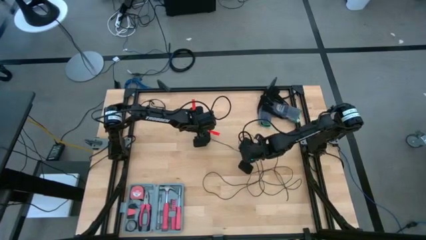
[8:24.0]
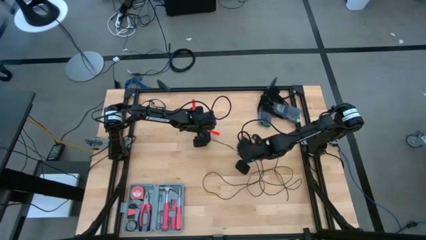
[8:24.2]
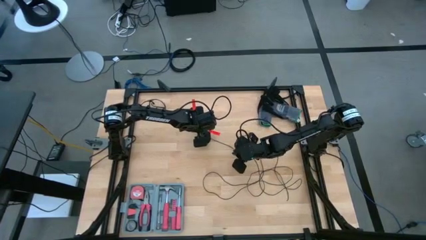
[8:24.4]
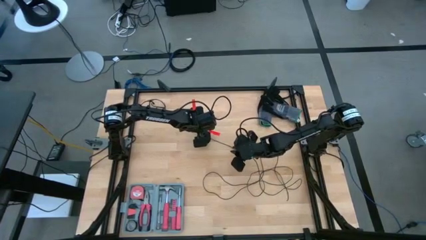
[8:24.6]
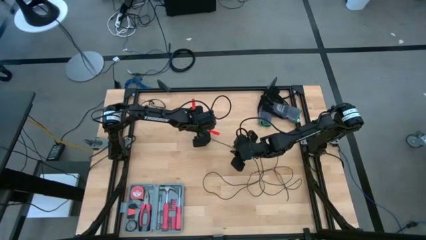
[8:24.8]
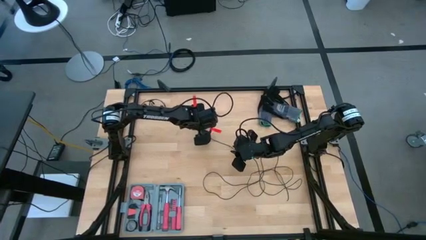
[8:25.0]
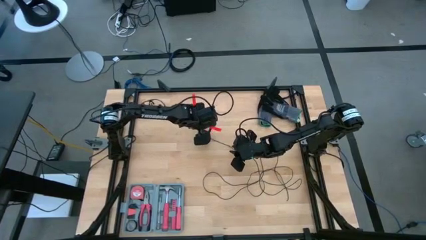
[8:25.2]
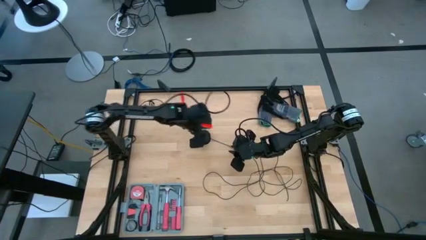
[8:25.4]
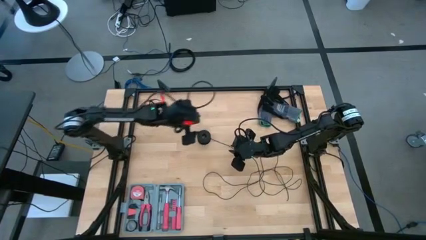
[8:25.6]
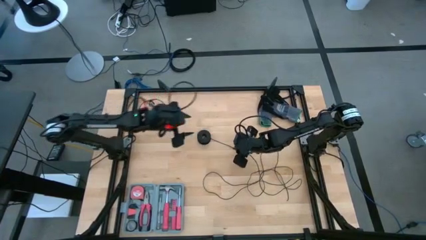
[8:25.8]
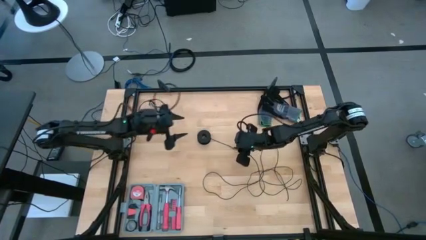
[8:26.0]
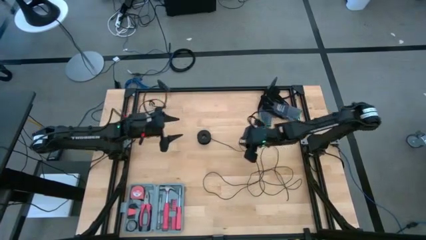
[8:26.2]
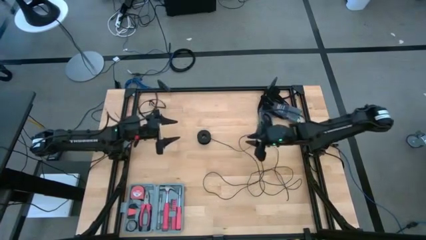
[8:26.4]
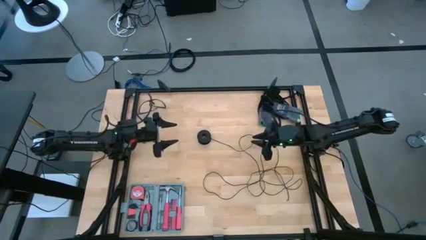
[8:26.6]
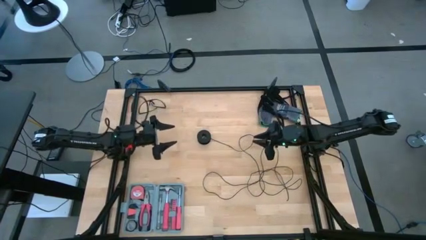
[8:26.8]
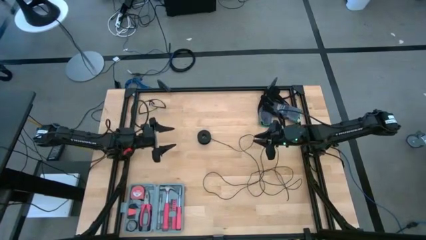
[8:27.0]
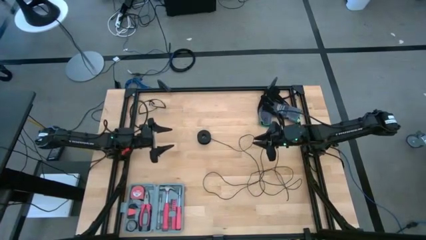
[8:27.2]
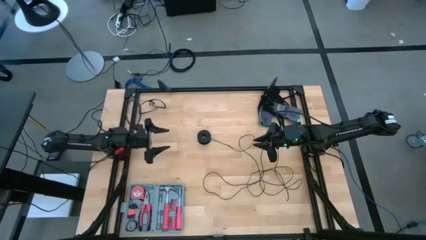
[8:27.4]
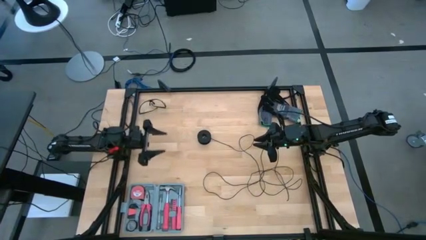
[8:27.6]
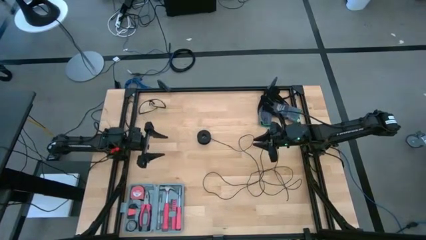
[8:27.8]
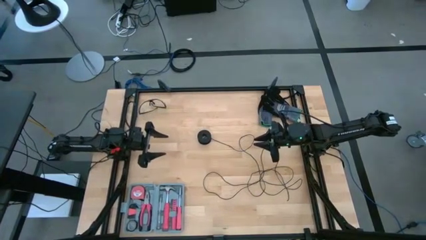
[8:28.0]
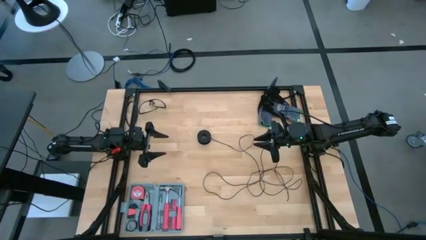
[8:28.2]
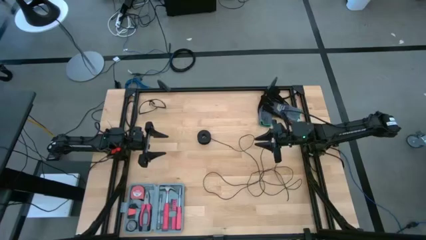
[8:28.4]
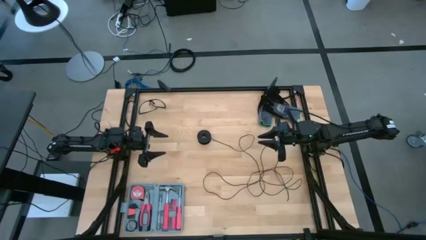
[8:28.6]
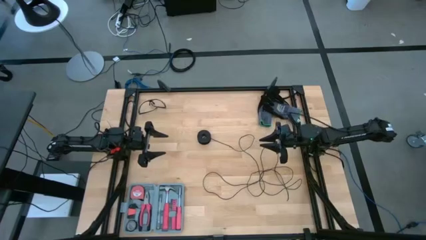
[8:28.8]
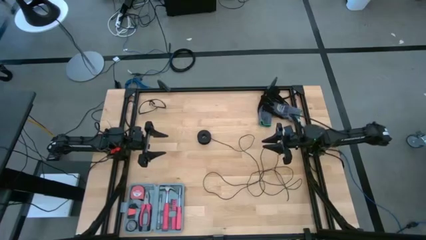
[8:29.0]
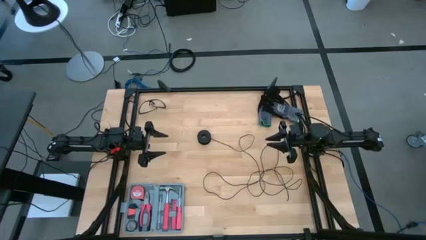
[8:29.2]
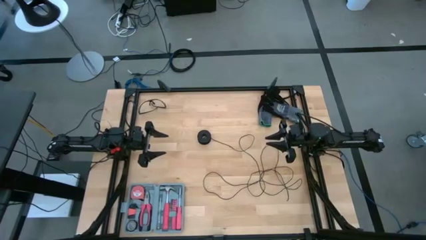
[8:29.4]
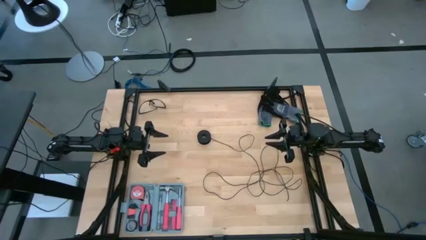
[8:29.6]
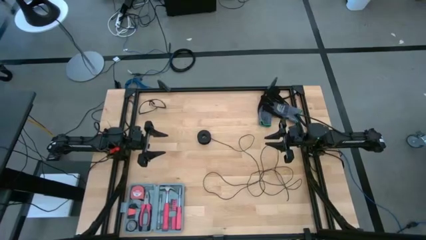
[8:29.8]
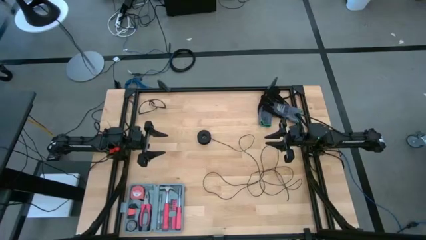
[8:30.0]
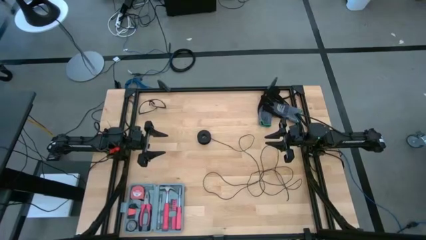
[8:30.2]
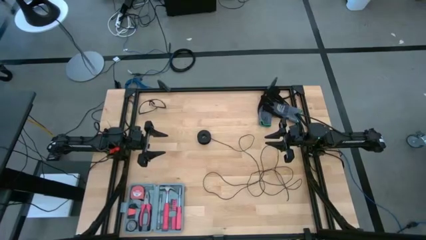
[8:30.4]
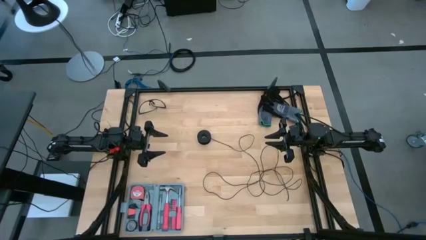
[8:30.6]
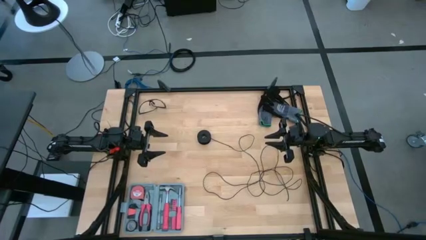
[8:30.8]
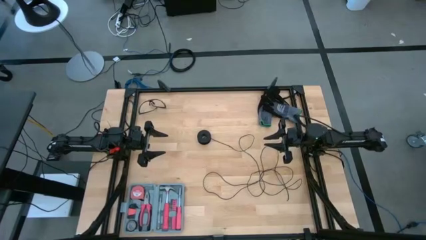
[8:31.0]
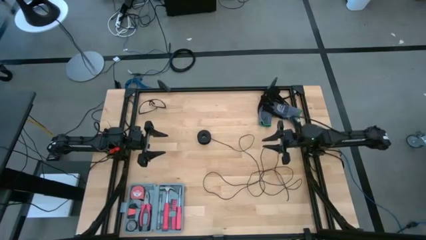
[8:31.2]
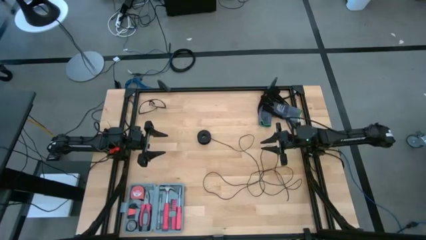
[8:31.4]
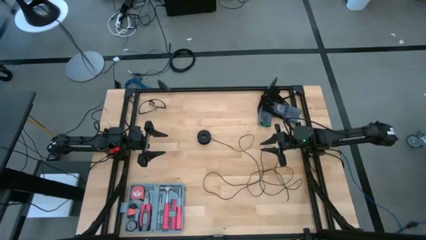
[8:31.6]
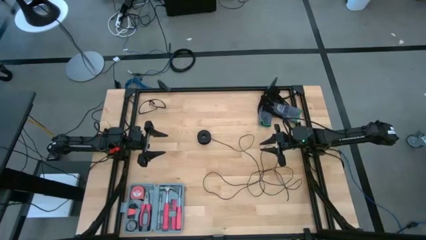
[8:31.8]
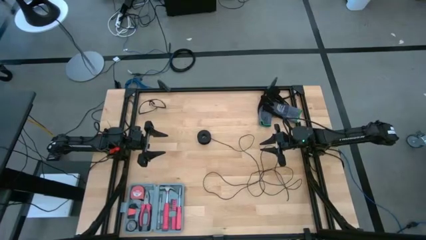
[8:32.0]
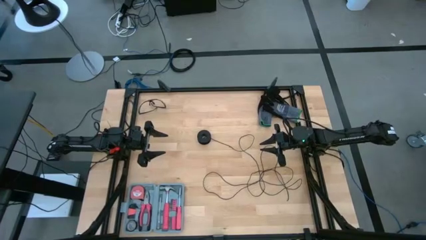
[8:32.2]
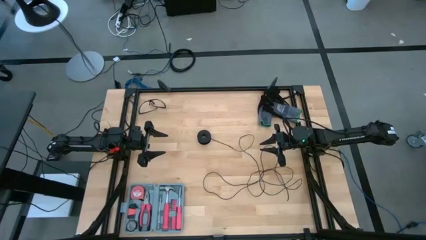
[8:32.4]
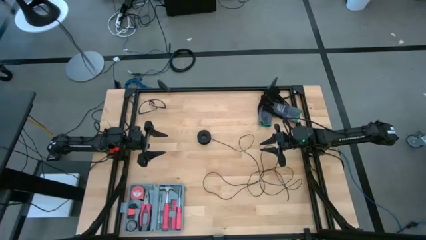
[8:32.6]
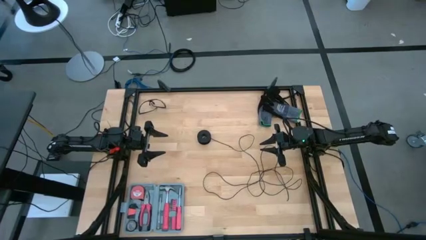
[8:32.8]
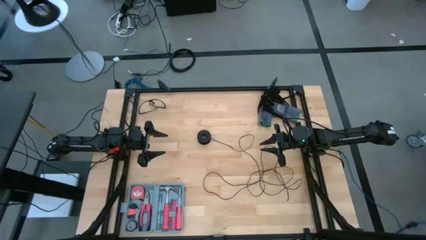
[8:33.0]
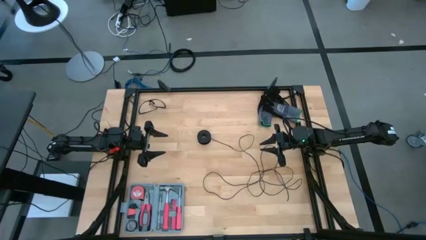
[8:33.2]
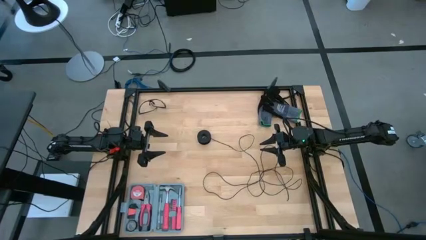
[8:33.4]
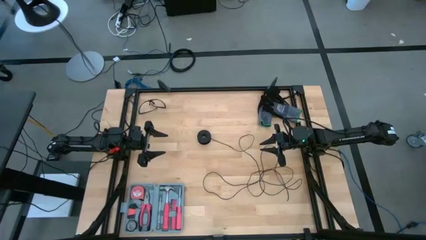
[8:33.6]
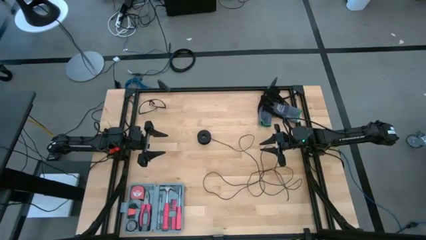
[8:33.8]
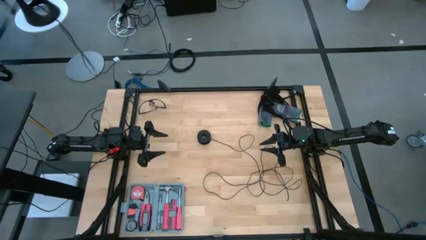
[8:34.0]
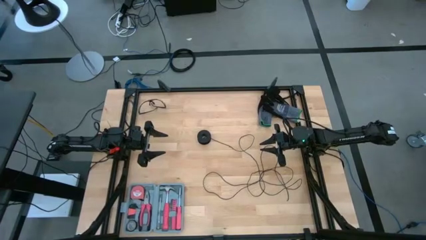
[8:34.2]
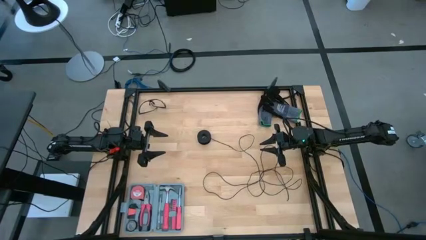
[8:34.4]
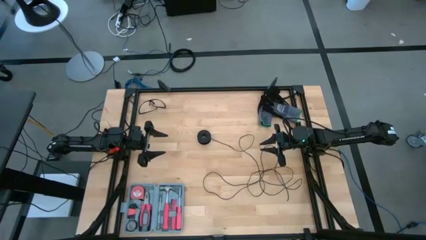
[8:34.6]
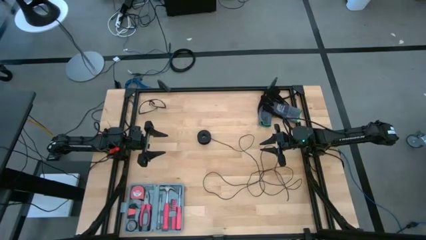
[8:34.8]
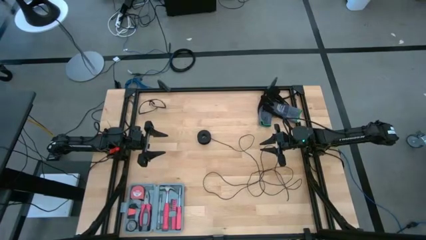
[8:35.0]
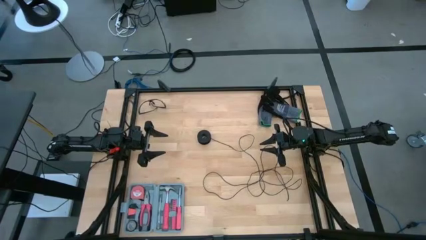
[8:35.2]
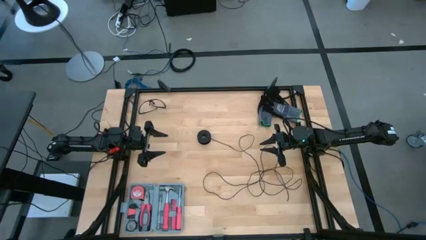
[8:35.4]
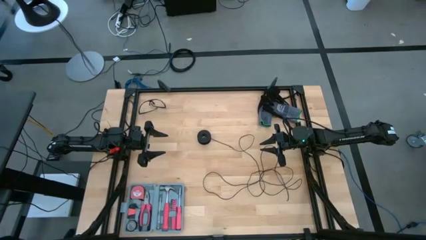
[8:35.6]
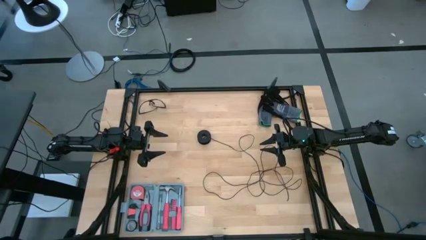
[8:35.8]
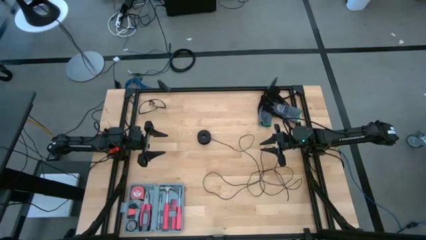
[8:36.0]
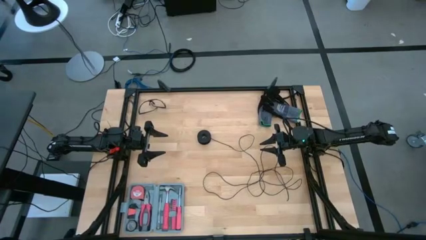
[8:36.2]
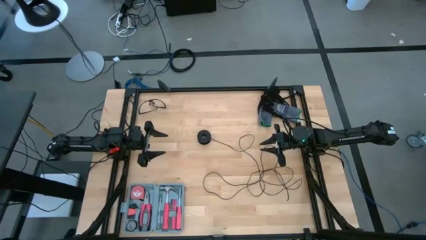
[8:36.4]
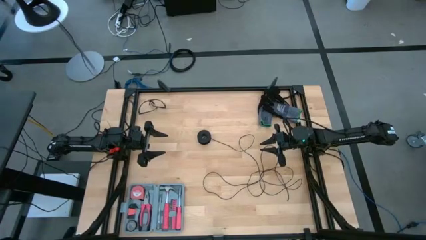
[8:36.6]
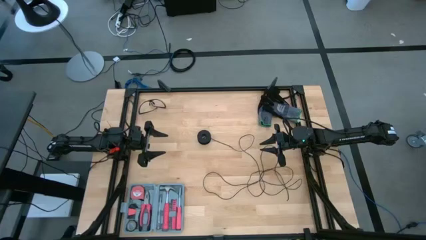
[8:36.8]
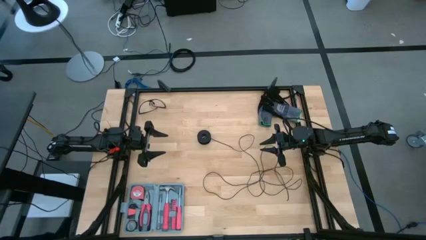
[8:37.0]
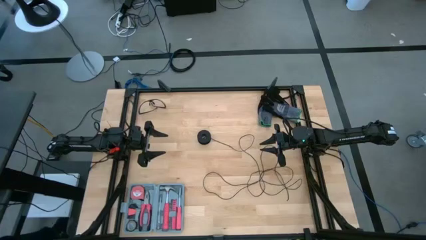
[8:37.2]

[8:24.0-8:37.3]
Task: Coil cords
Return to Home Position
